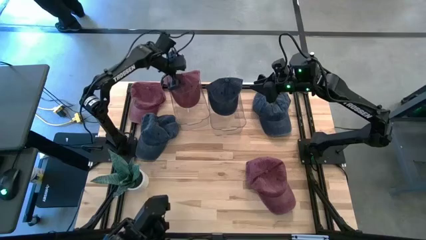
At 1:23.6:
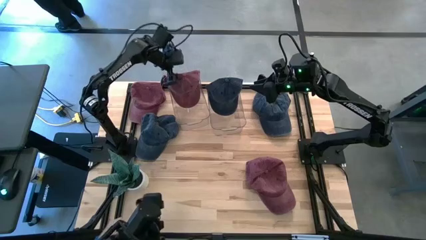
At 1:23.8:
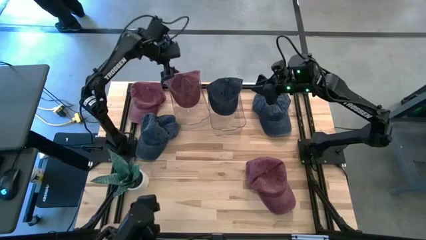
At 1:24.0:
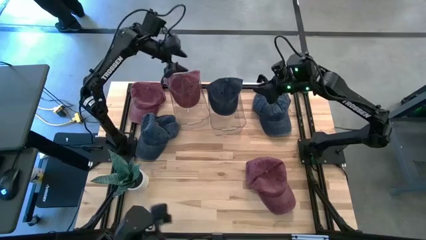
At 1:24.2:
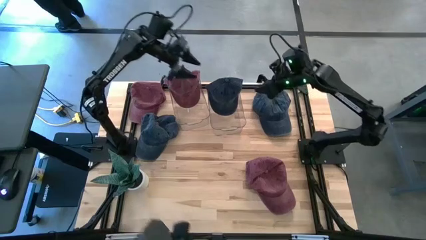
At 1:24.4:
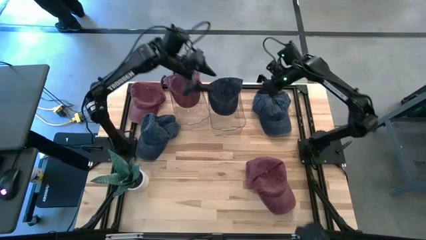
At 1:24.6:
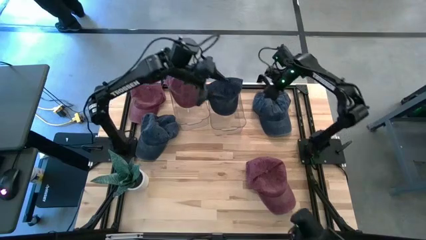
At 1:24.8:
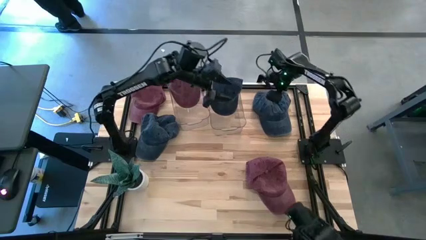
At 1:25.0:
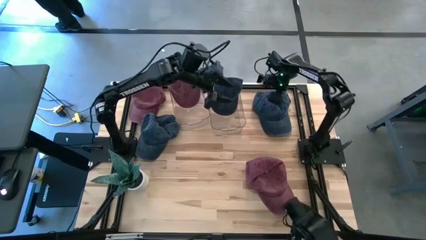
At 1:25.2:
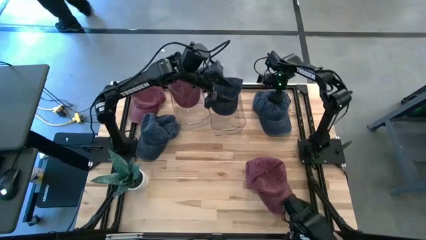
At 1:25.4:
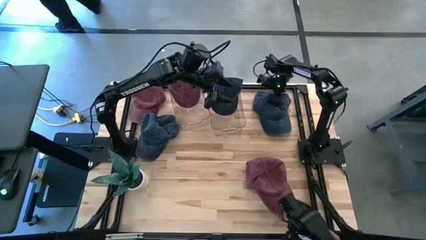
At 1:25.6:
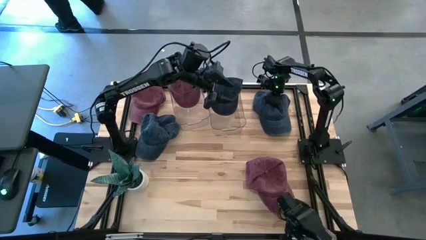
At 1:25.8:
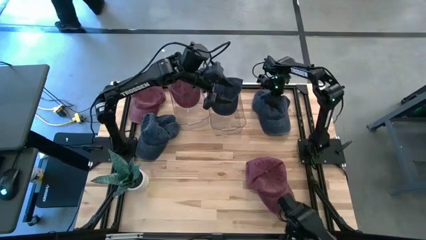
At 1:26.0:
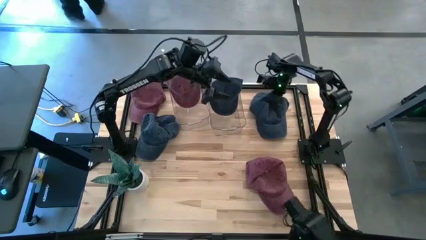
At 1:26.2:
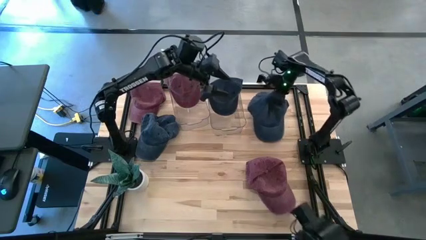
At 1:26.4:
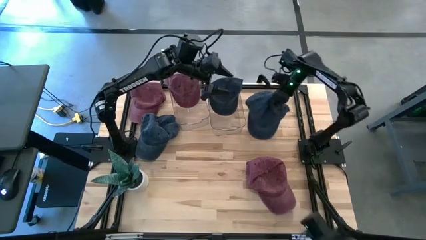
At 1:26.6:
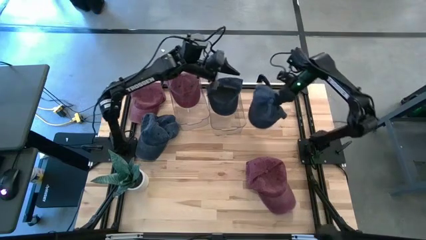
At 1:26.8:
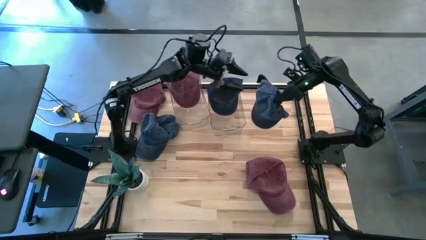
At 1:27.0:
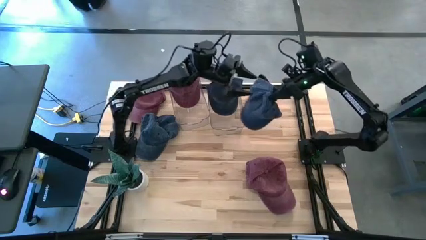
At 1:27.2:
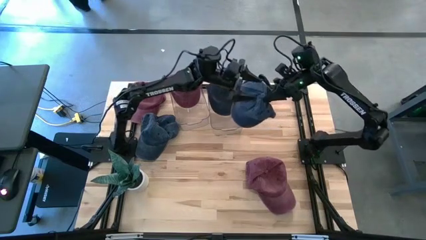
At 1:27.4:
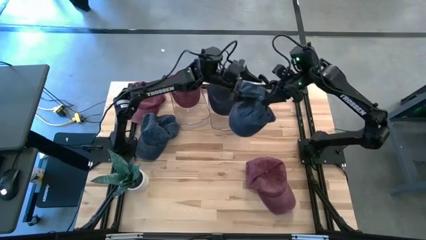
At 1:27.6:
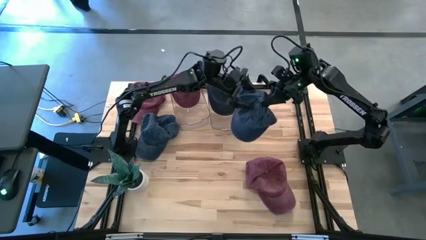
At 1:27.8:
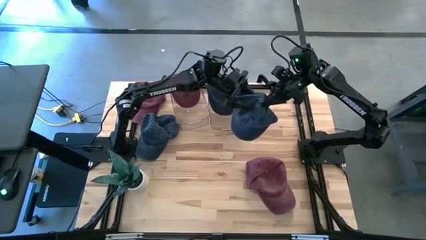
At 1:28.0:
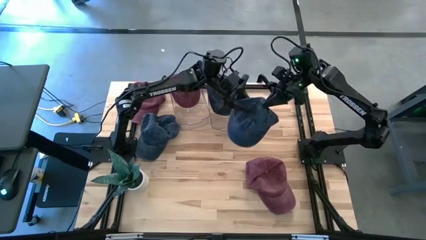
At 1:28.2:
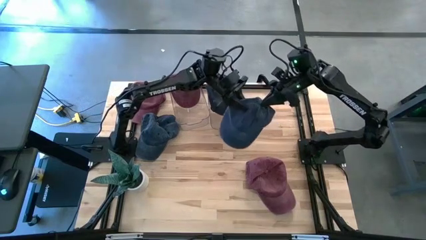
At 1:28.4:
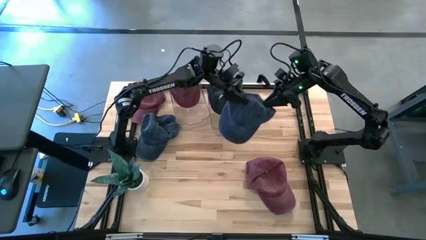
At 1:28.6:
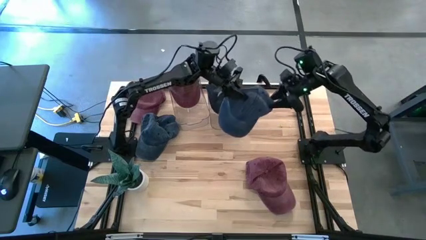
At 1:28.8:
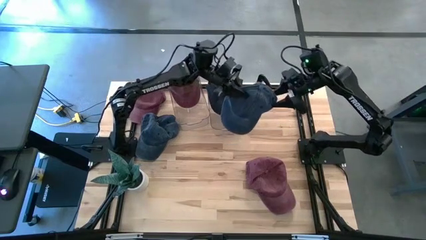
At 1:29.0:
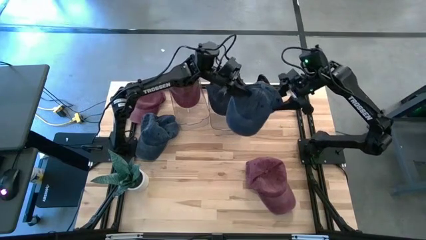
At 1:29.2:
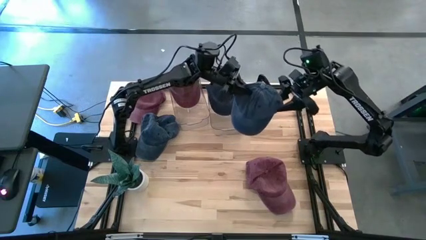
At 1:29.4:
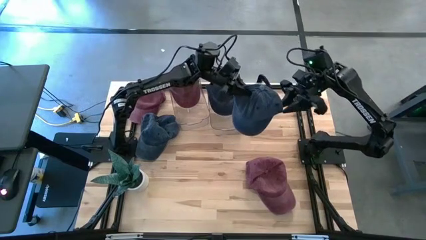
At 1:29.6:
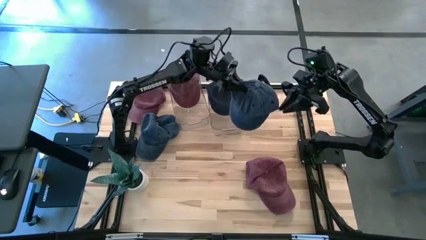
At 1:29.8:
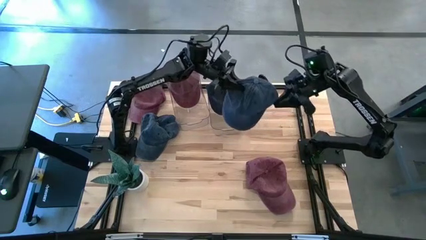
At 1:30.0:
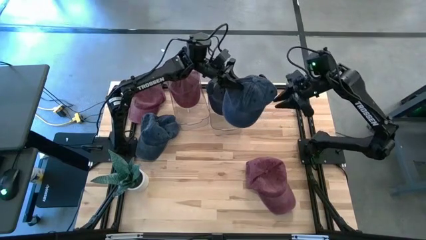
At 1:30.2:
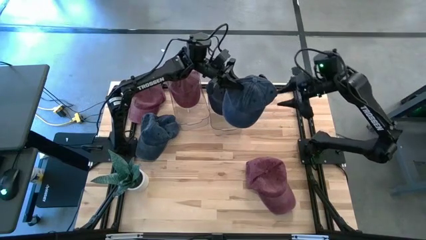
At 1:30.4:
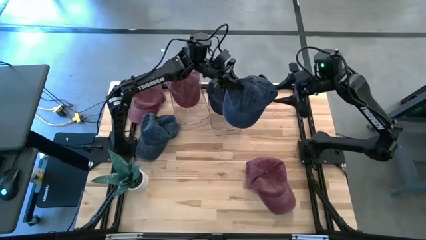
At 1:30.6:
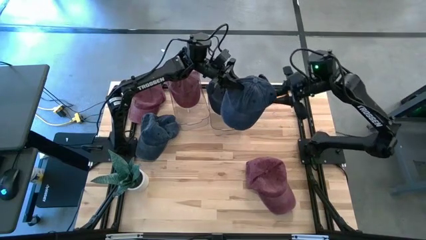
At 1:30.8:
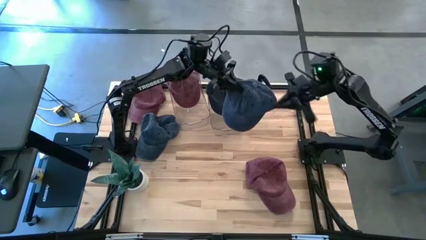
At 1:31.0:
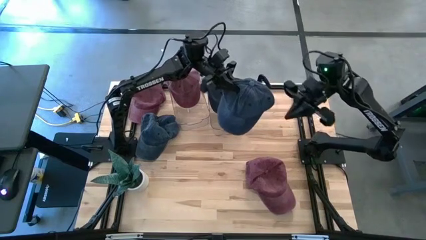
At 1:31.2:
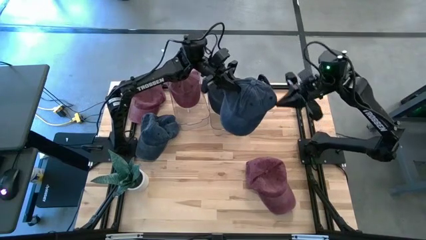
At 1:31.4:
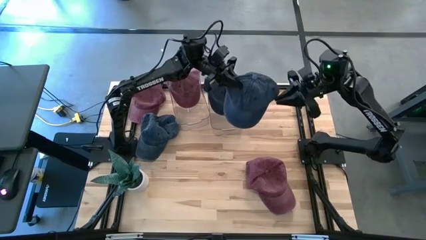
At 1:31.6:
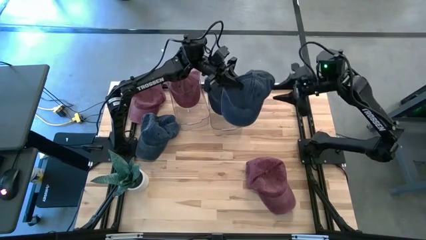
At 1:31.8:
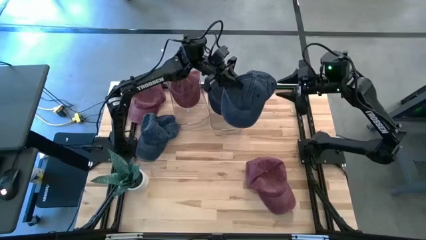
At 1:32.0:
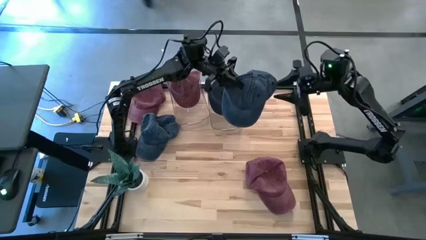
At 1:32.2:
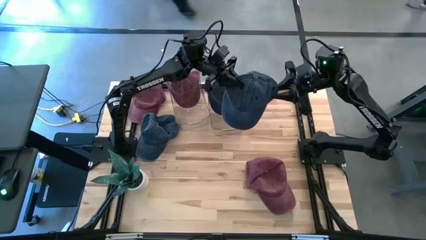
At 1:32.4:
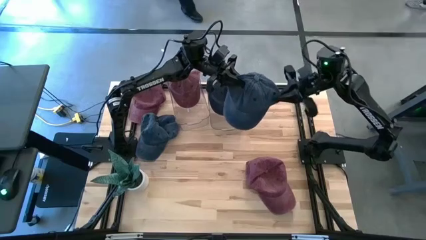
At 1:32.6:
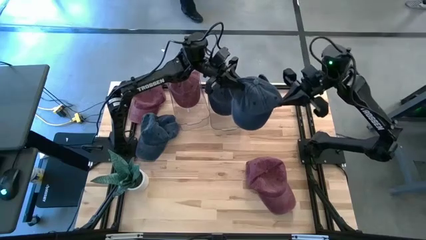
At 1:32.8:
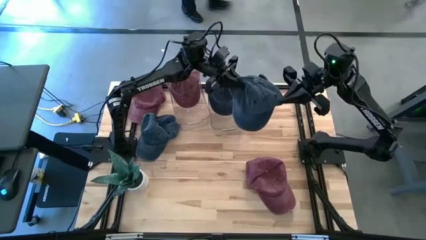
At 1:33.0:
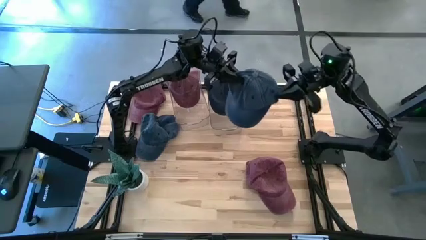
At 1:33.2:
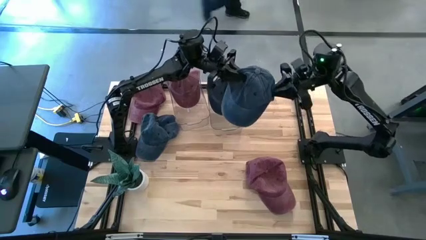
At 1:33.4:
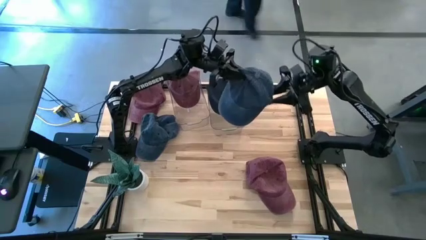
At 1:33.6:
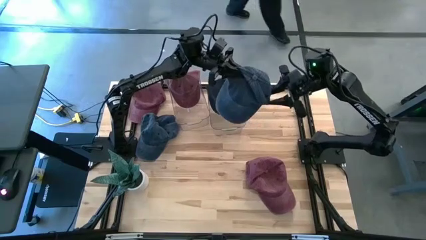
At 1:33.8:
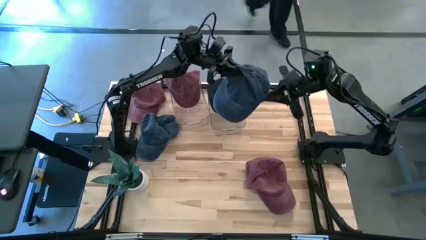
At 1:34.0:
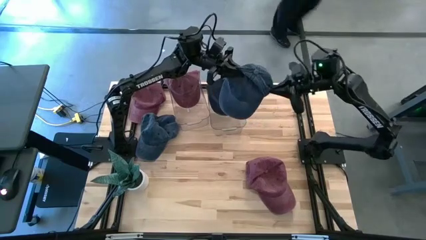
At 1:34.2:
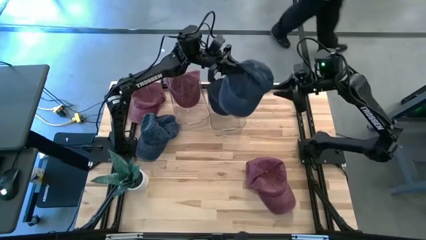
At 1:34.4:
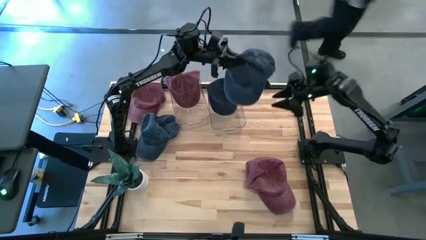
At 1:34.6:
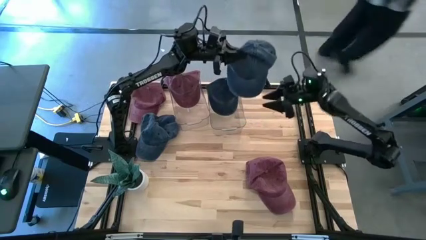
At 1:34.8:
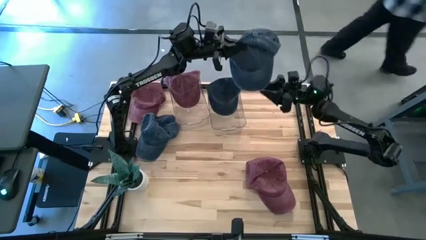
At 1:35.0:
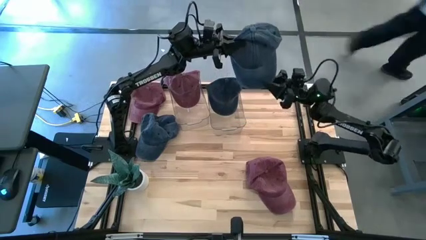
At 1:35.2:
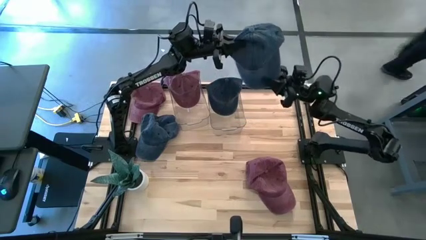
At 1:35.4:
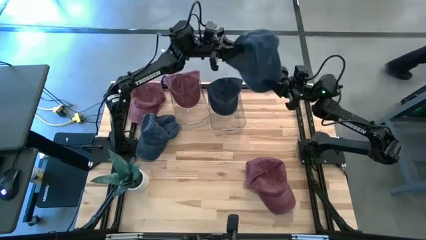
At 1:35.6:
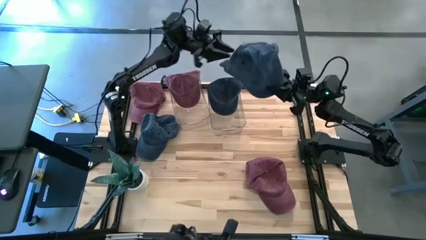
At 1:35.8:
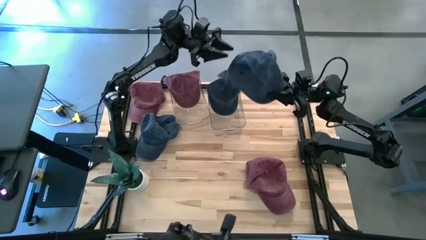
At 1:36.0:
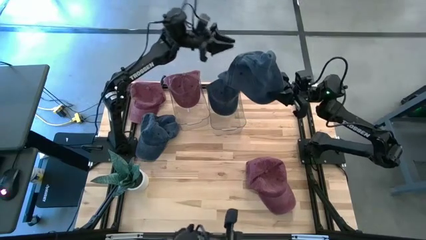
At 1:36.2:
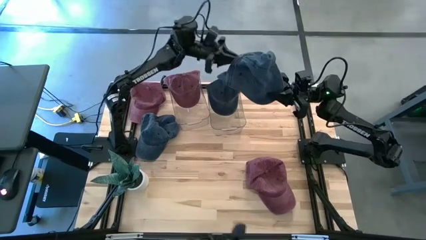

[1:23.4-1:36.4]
Task: Pick & Place hat
Put the right blue cap into the right bin
